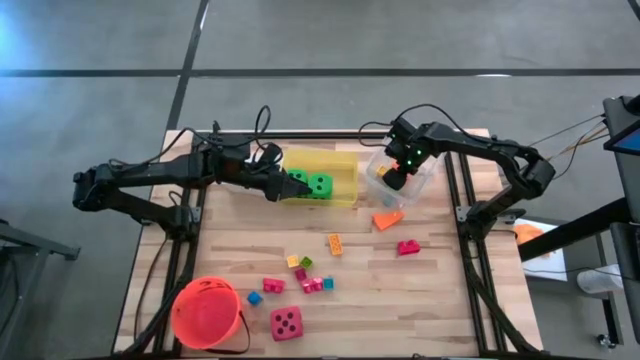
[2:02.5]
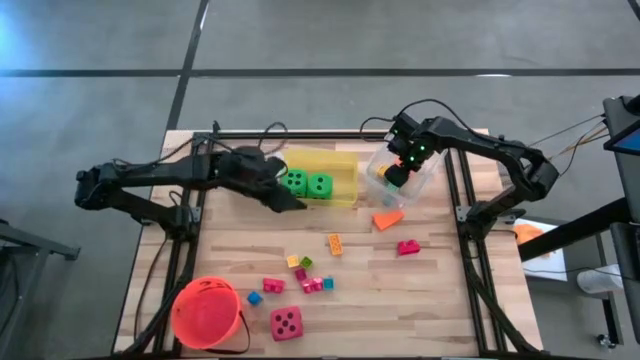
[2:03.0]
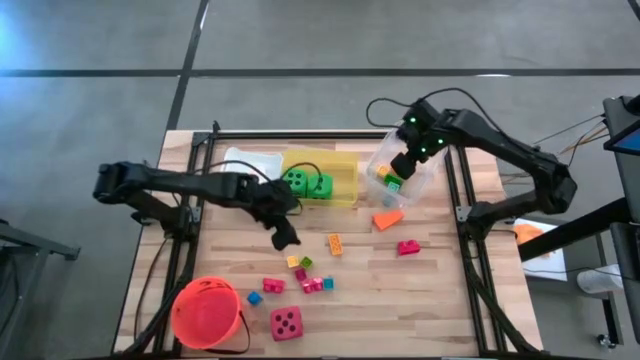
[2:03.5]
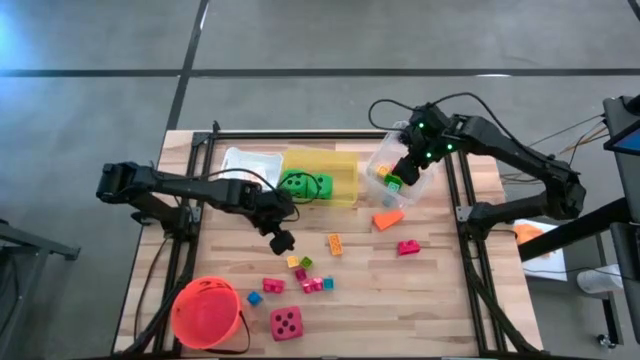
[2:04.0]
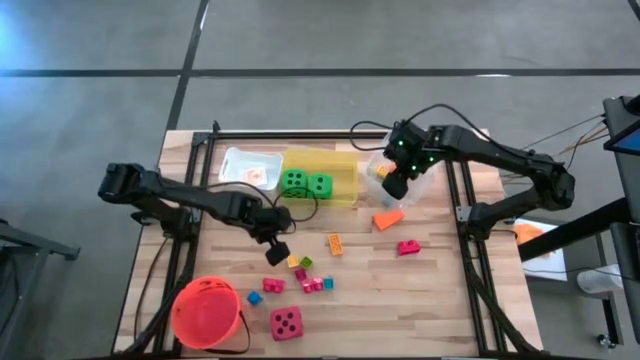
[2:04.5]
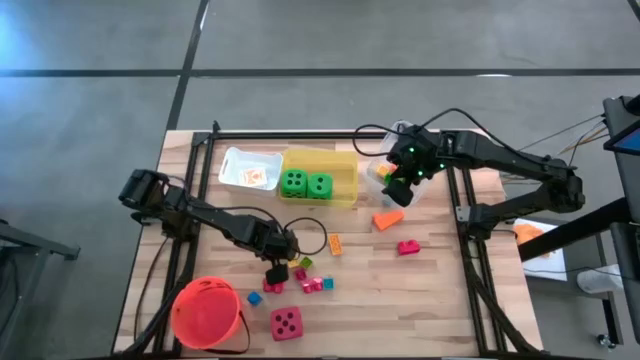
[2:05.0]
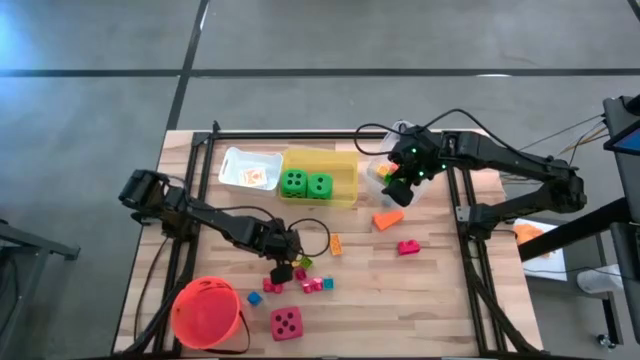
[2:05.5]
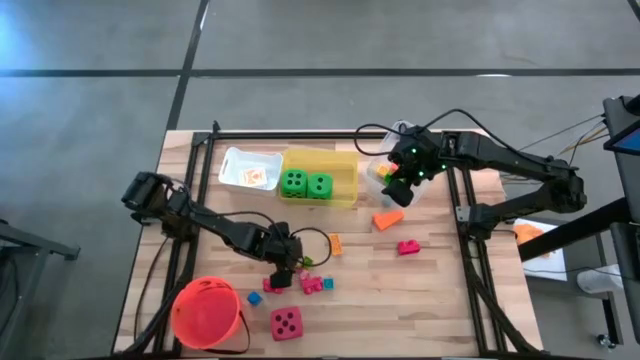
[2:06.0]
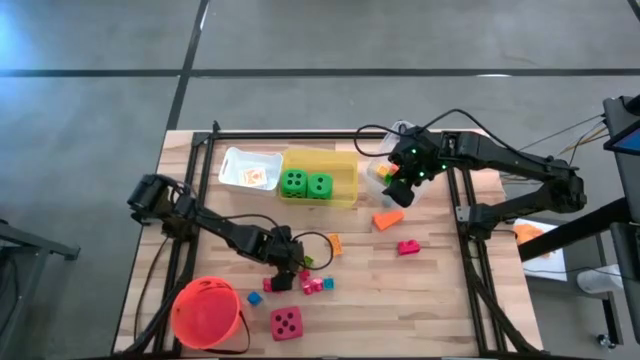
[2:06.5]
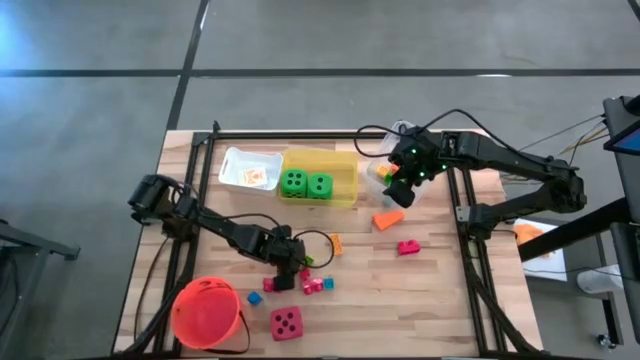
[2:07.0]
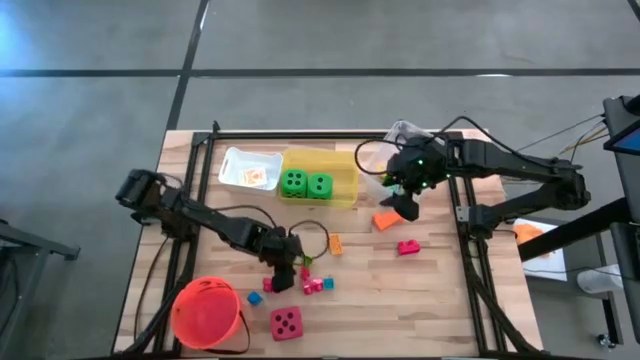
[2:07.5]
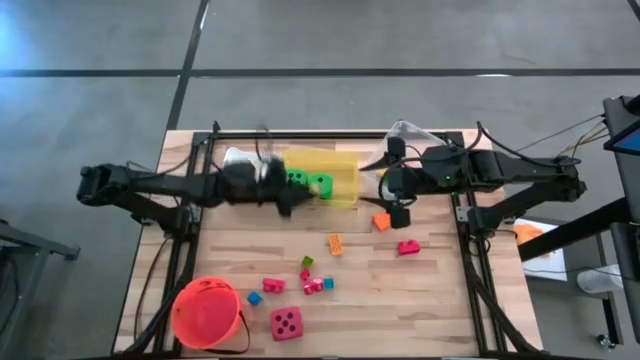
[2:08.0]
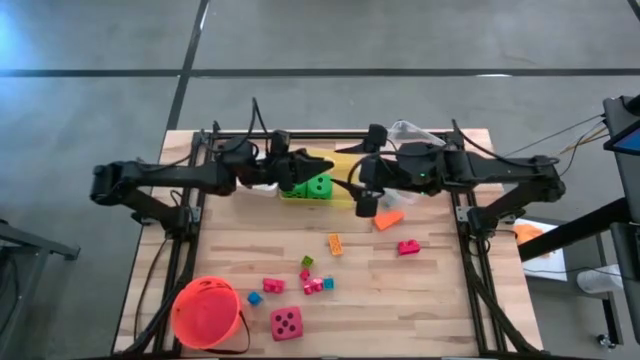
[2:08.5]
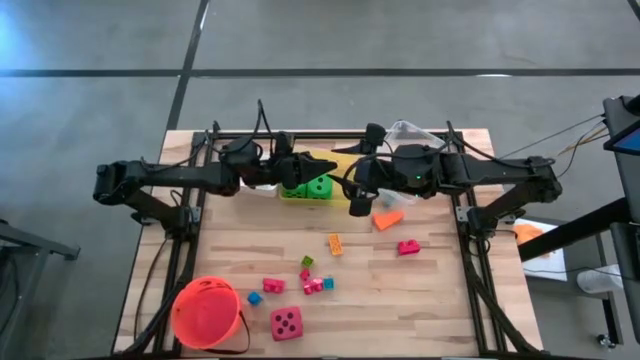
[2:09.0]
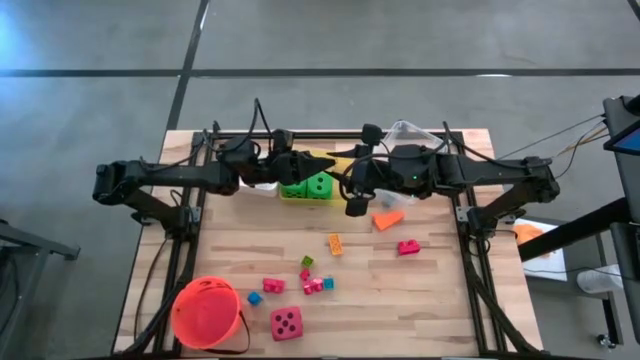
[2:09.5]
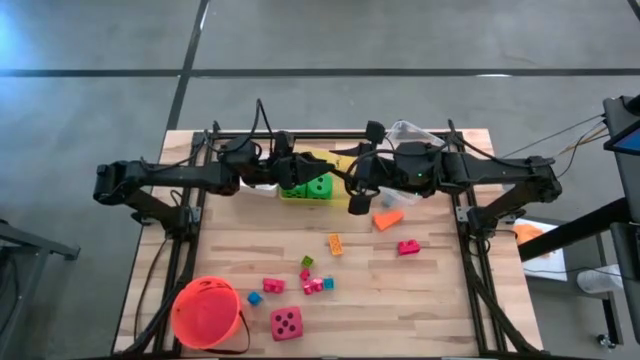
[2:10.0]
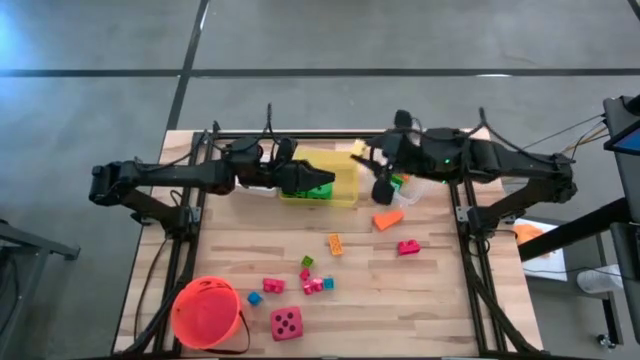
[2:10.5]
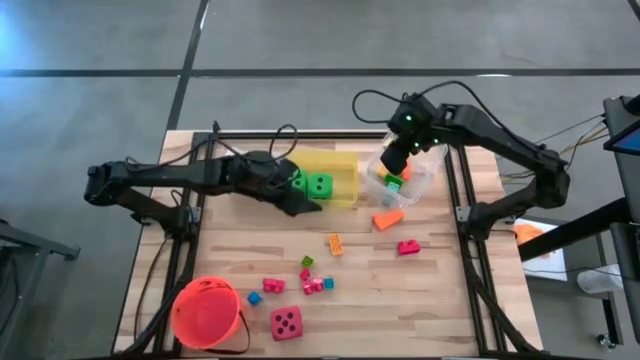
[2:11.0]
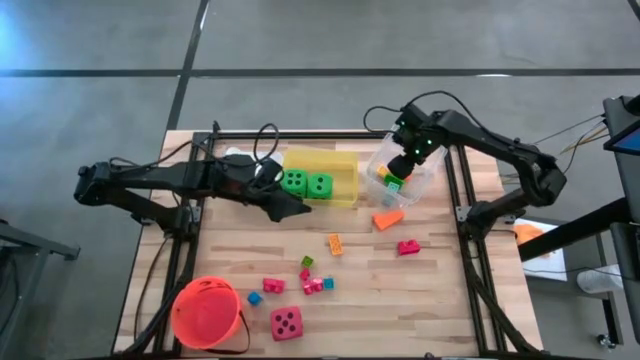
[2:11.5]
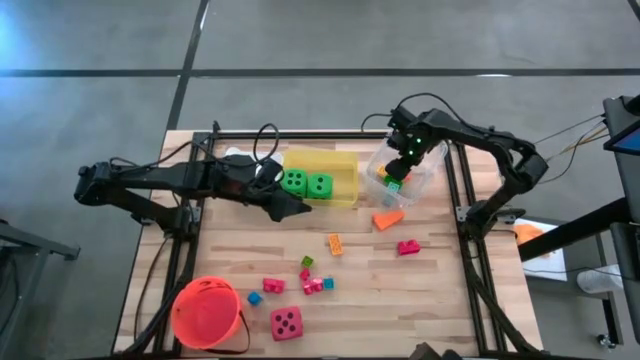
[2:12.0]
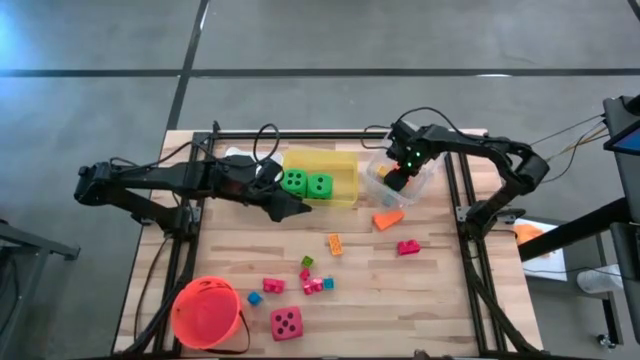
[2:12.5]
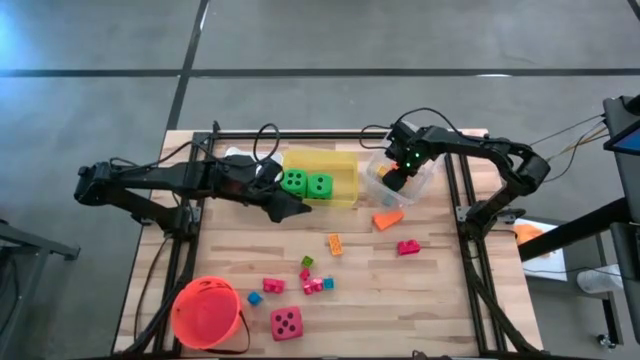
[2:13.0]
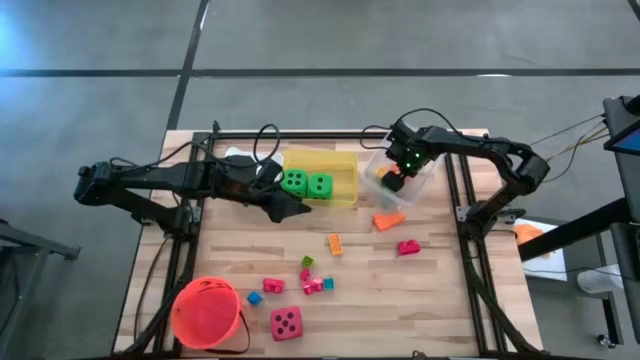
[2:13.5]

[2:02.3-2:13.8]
Task: Pick & Place Toys
Put the yellow game piece into the transparent bin

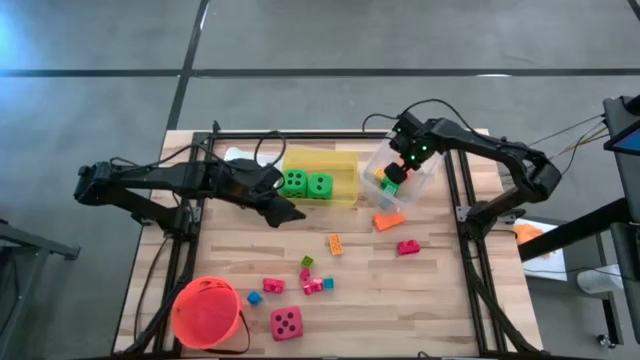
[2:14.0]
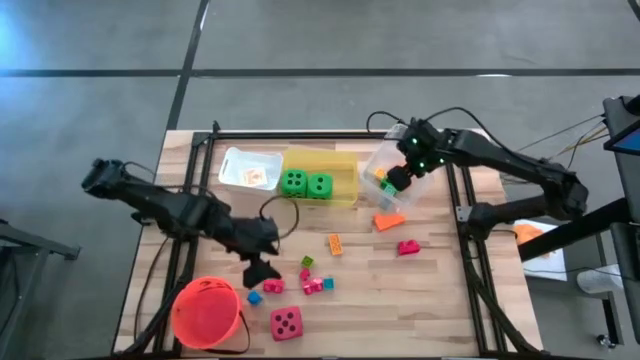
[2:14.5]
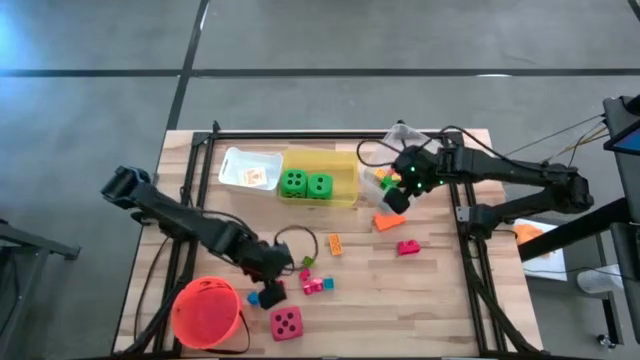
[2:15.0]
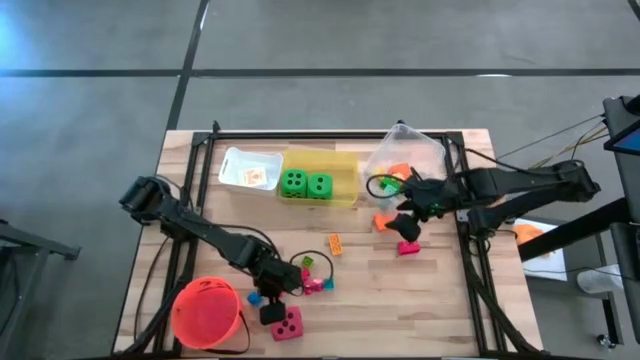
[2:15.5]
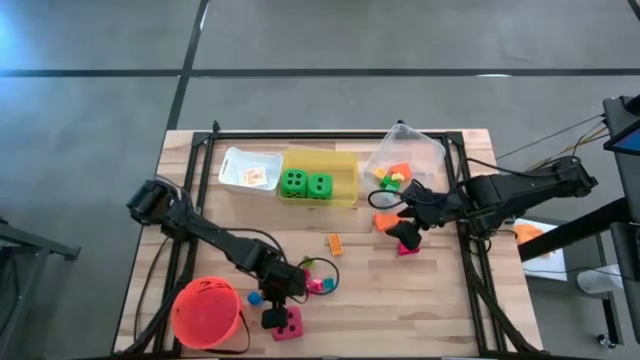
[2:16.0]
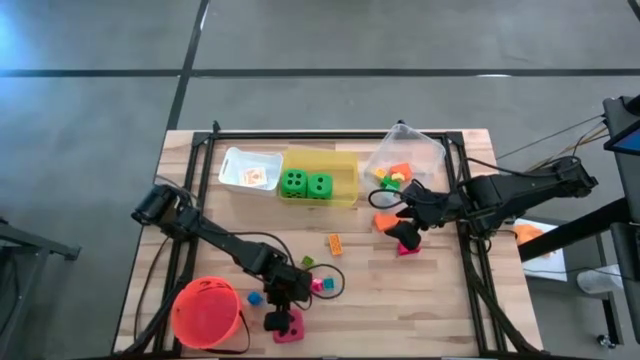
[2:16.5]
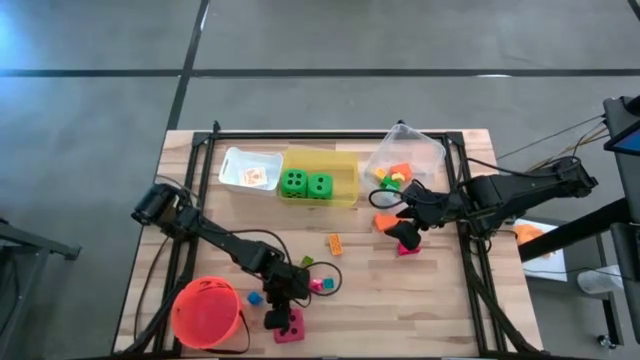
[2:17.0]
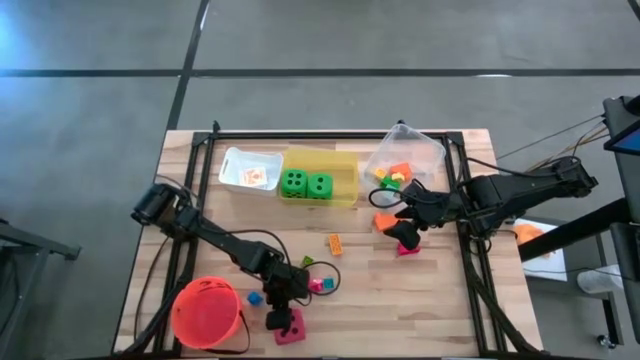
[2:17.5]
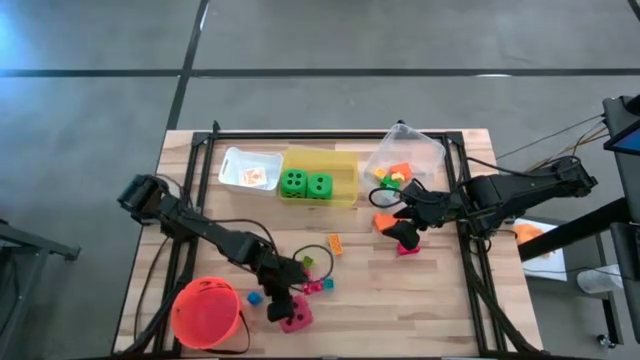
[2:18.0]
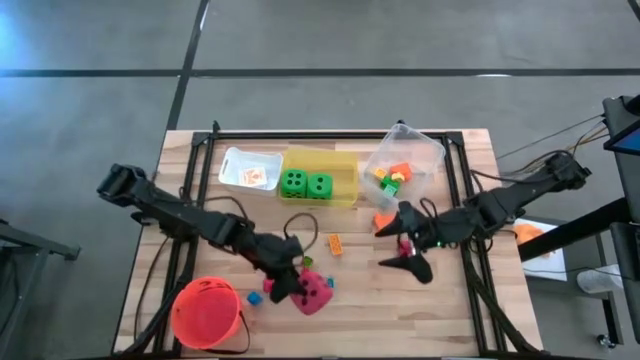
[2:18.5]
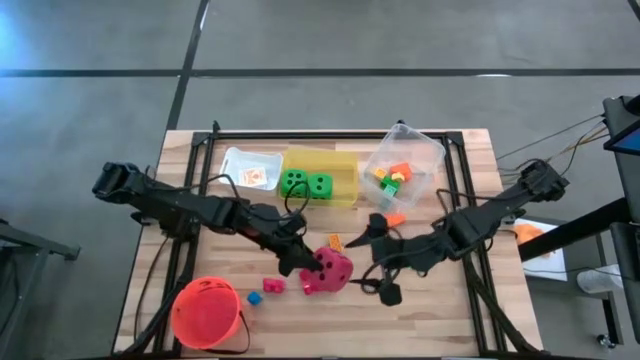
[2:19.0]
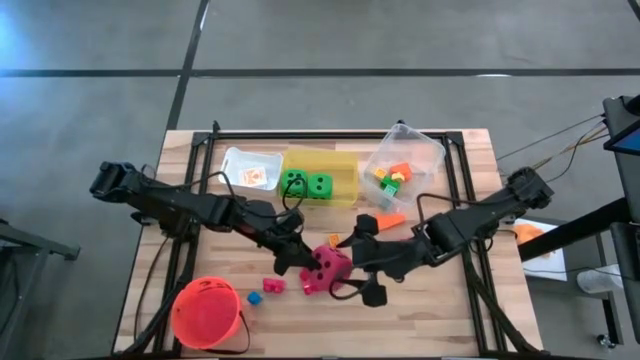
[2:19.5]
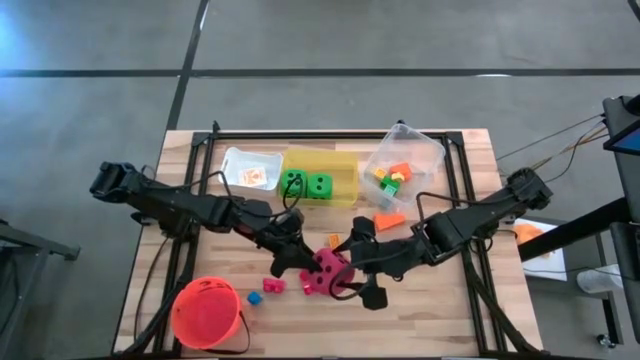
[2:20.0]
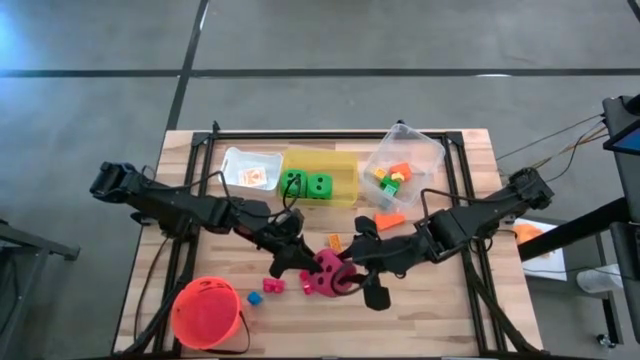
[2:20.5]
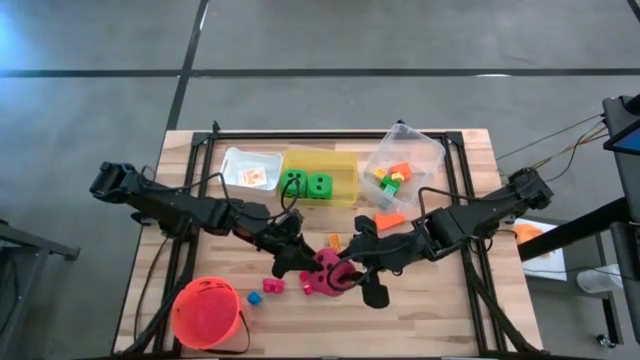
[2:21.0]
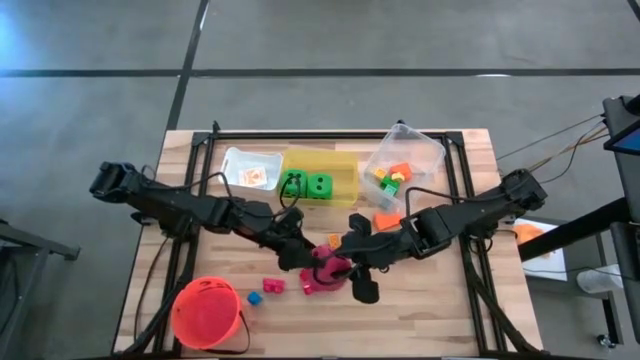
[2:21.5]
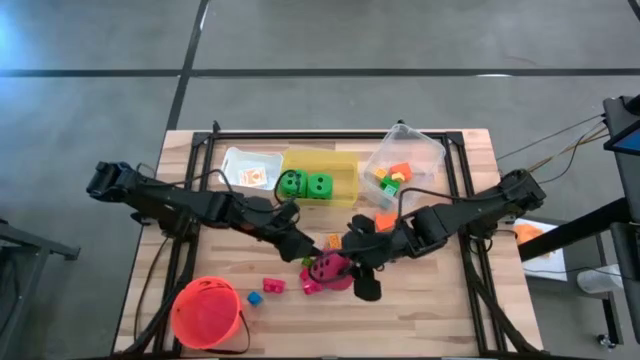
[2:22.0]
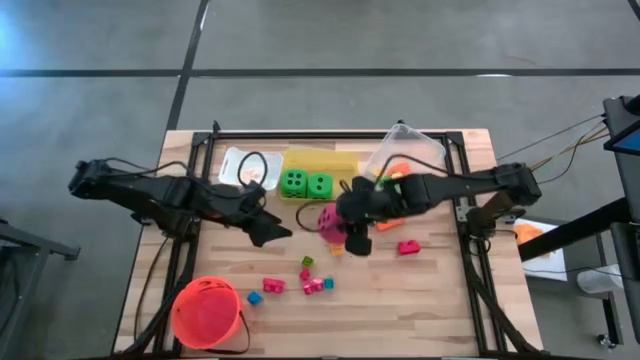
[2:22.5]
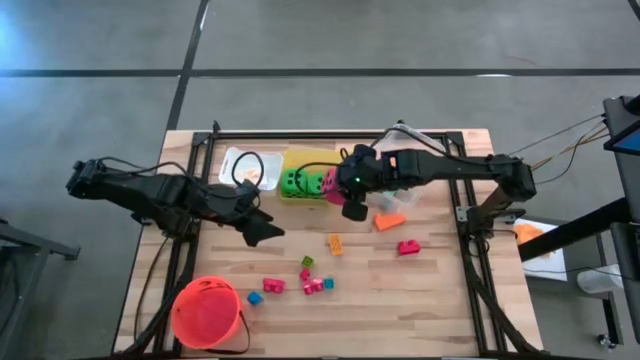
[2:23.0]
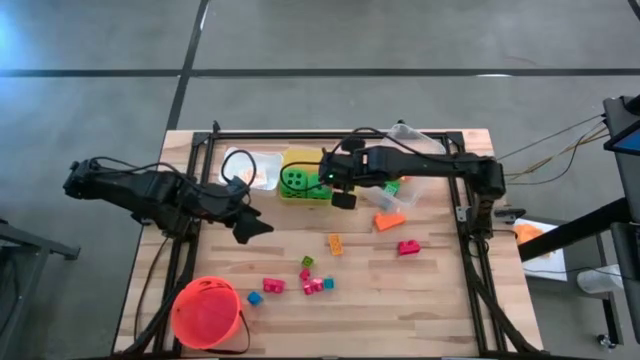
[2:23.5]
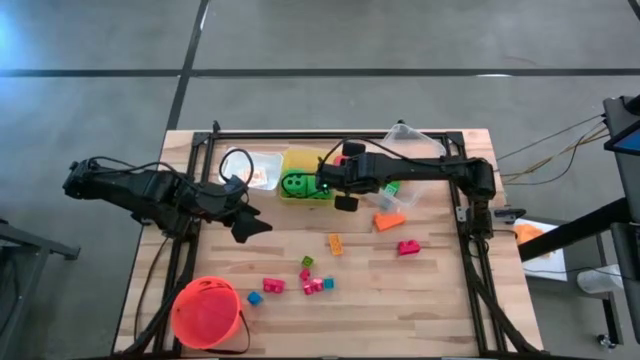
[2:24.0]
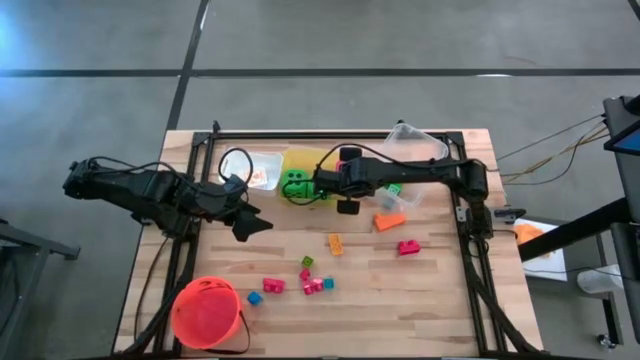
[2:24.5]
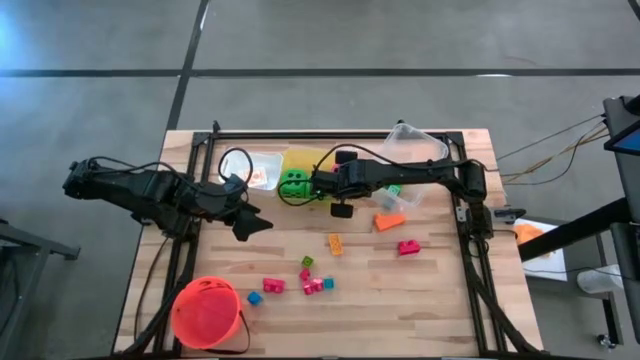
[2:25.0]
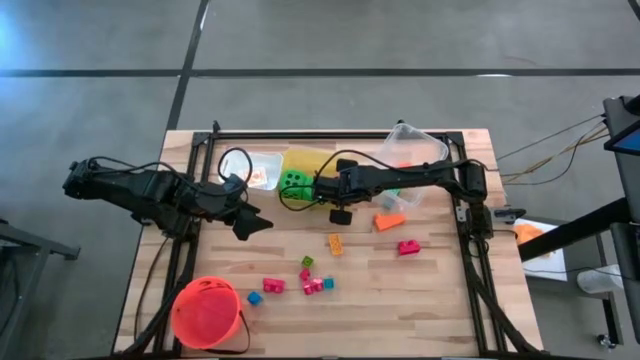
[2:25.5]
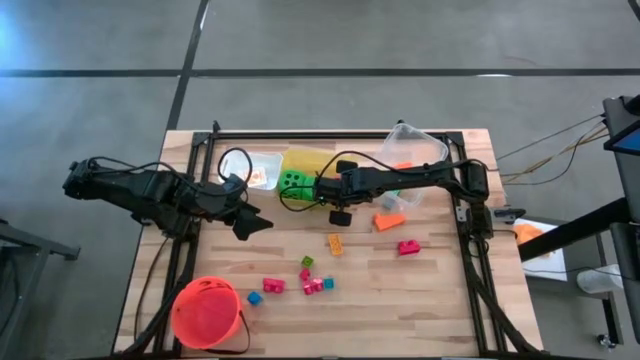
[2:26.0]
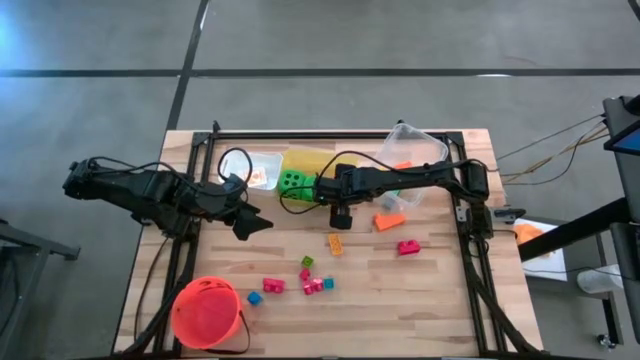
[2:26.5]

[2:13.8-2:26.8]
Put the red dice into the yellow bin
